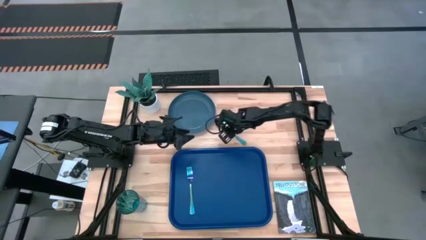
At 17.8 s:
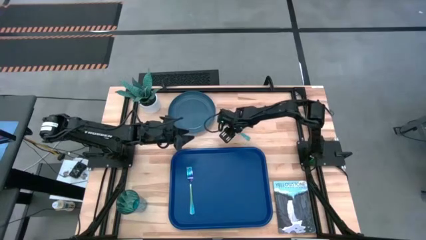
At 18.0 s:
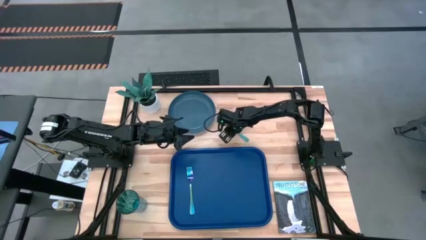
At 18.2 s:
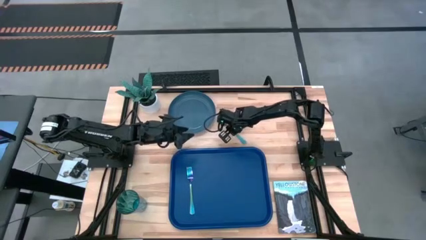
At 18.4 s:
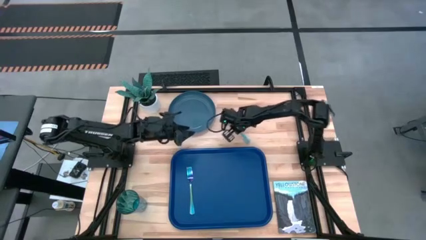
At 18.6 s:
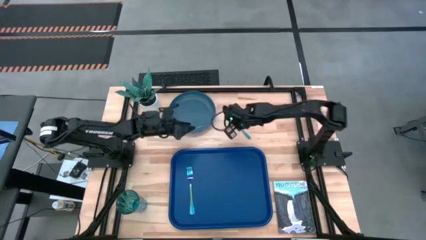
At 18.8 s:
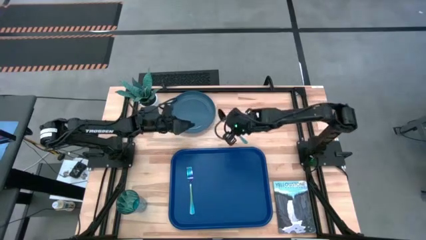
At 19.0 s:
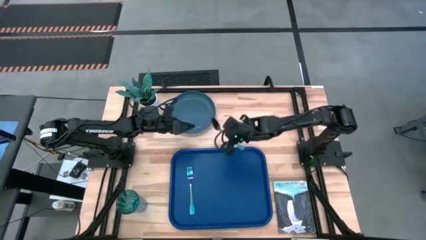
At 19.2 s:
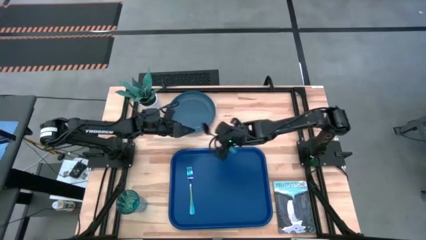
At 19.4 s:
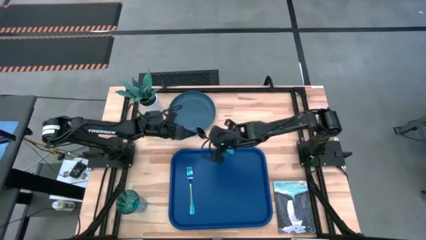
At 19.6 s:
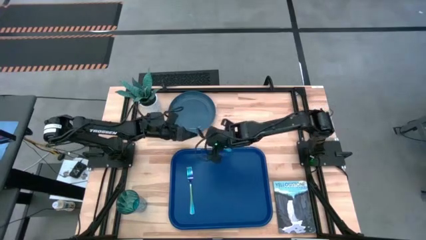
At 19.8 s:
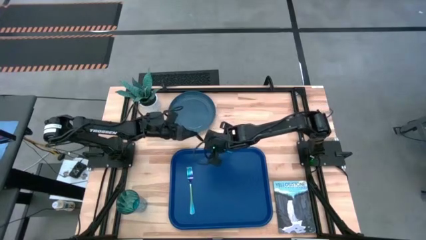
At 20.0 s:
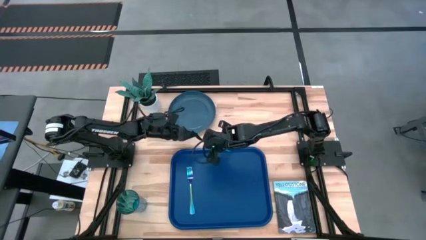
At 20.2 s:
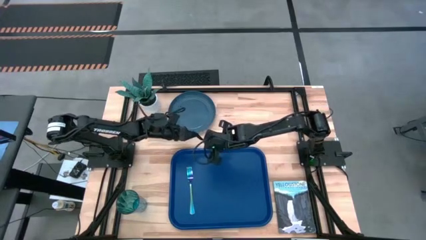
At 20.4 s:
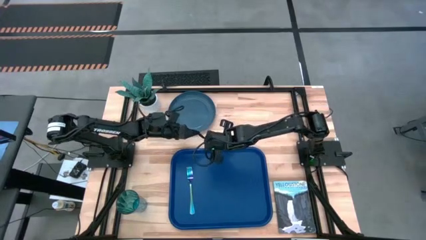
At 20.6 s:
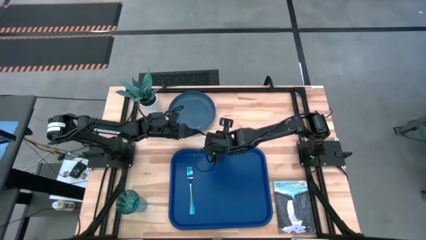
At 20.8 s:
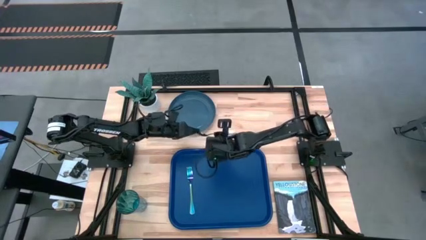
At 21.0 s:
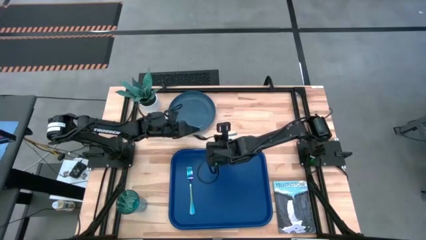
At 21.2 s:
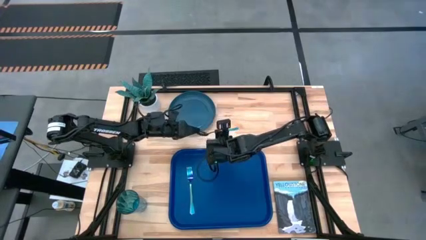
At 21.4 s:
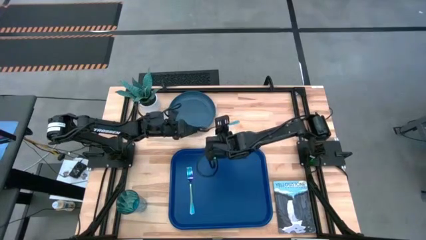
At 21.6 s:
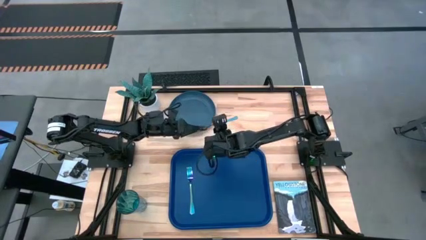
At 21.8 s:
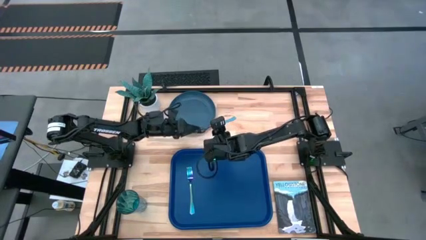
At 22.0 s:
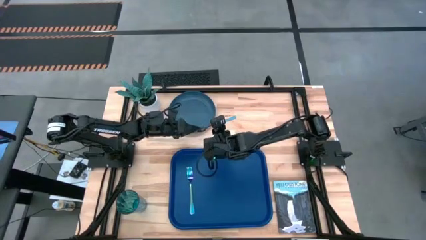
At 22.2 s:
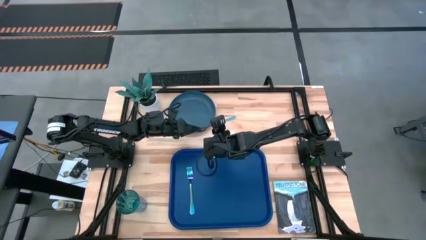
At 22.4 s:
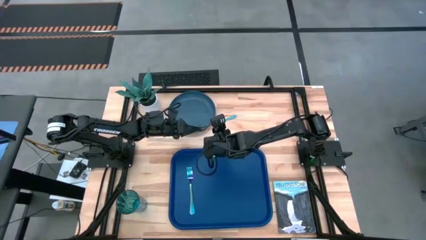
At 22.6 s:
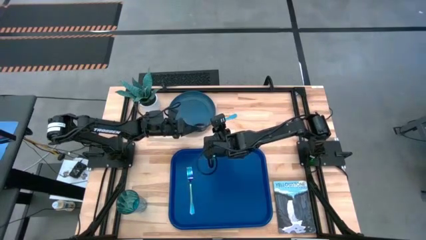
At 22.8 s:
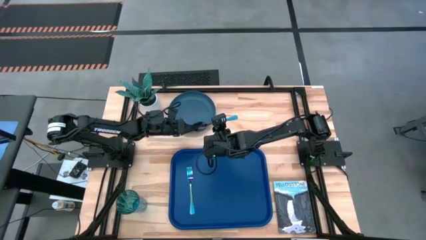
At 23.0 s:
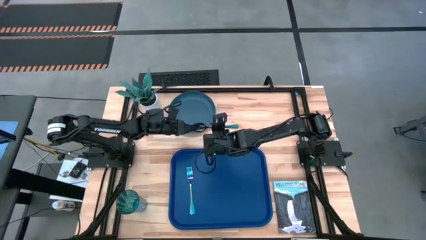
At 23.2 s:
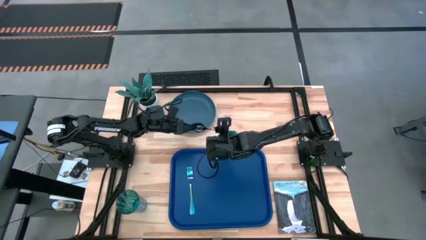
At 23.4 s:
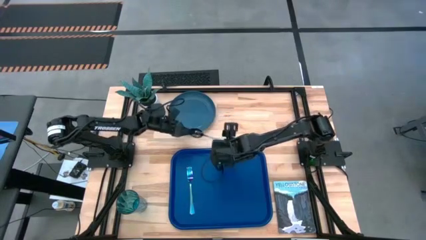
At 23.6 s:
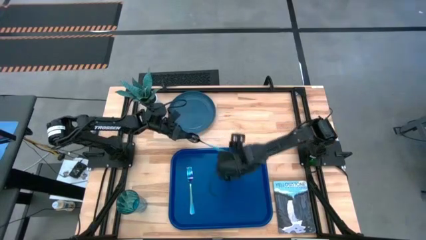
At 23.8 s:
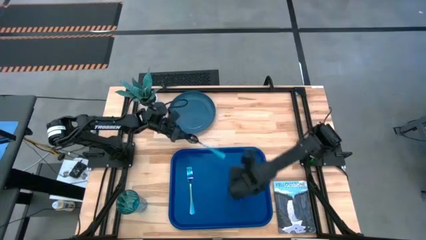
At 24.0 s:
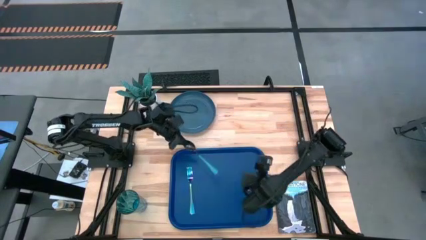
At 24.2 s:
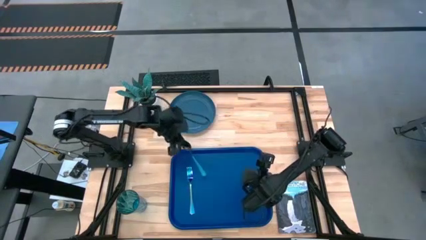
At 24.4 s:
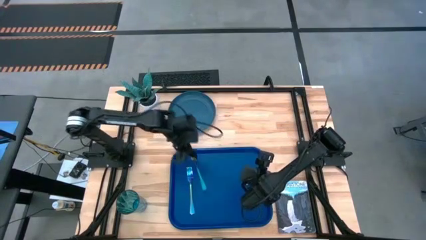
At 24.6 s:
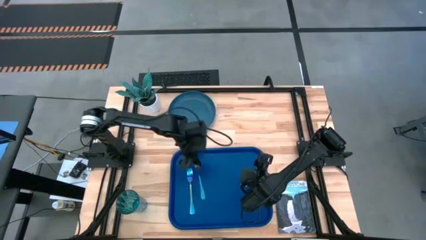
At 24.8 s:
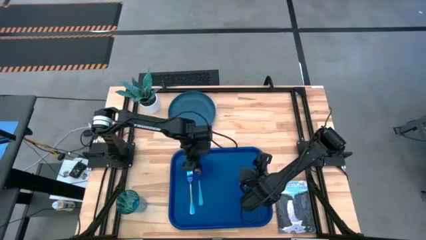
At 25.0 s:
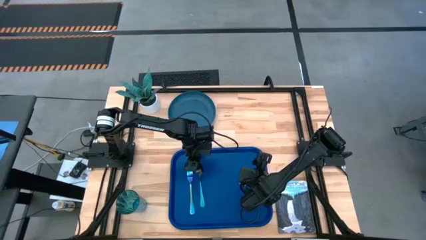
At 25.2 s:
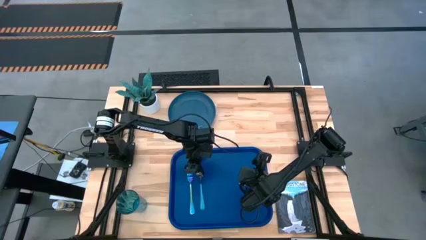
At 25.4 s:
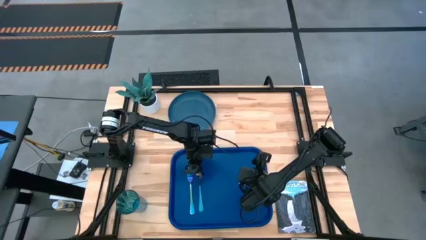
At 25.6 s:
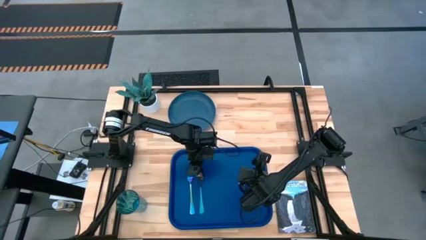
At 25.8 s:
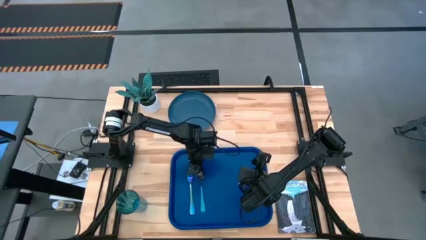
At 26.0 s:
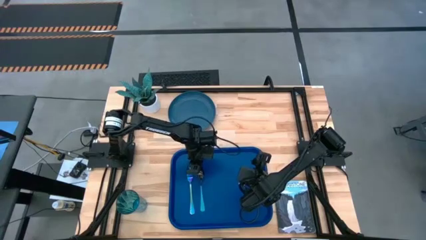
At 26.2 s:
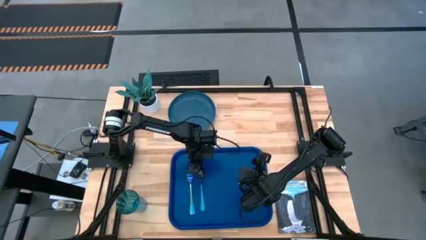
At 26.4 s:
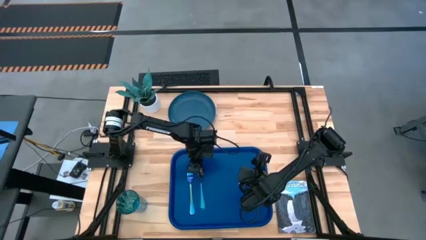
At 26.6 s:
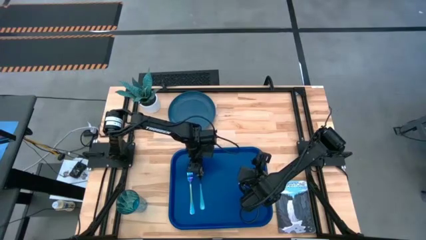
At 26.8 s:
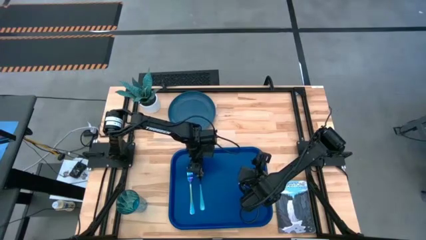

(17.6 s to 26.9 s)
Task: Pick and place plate/cup/fork/spoon on tray
Put the blue spoon on the blue tray

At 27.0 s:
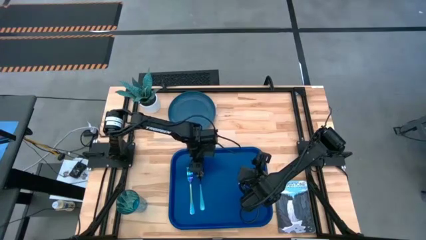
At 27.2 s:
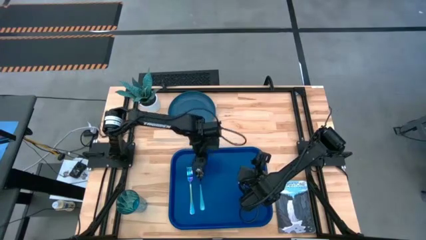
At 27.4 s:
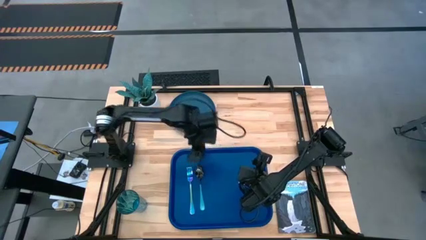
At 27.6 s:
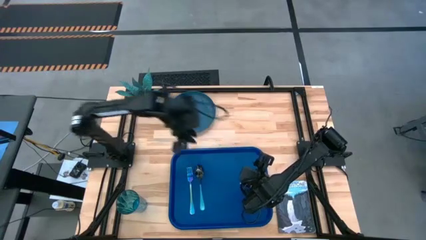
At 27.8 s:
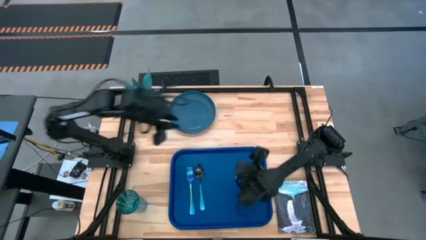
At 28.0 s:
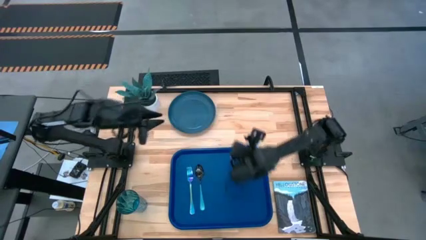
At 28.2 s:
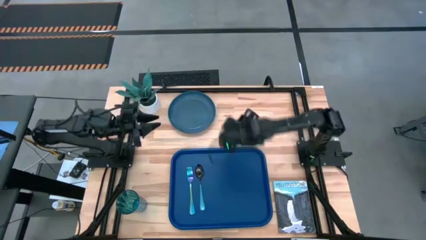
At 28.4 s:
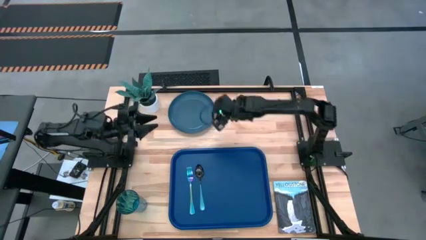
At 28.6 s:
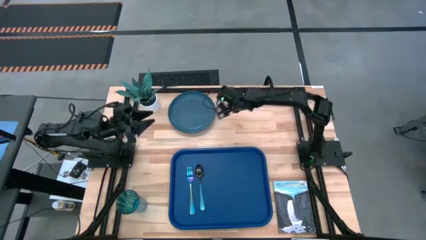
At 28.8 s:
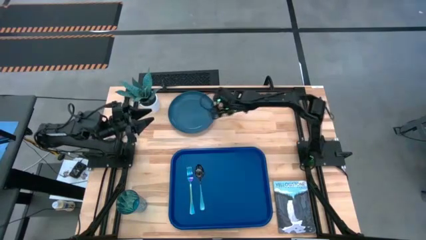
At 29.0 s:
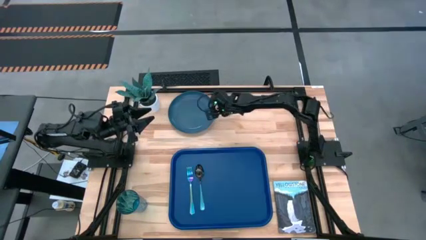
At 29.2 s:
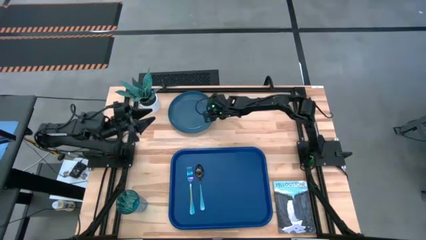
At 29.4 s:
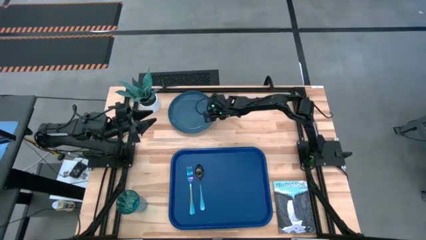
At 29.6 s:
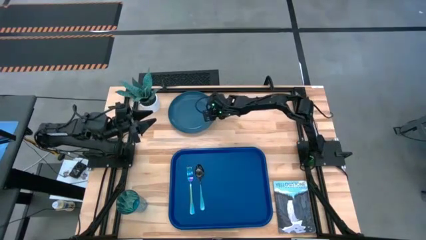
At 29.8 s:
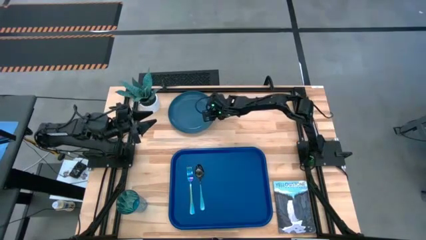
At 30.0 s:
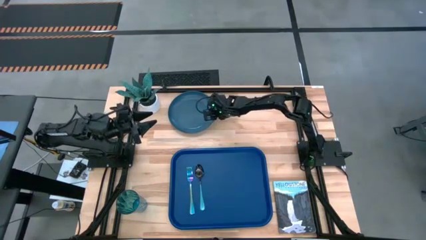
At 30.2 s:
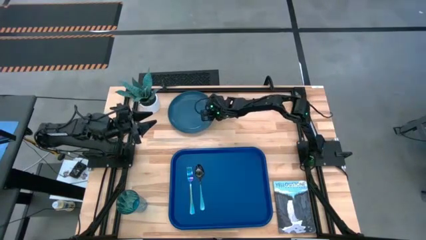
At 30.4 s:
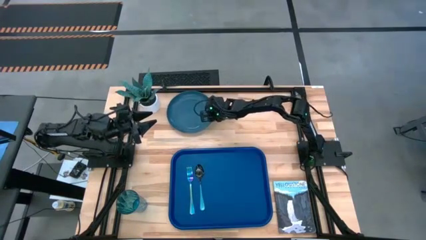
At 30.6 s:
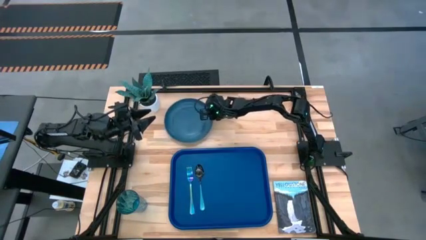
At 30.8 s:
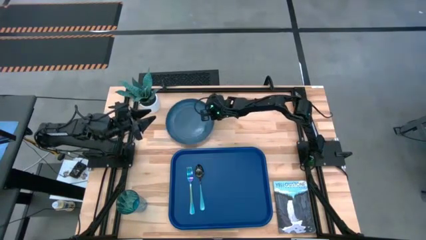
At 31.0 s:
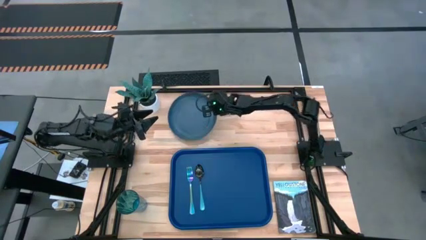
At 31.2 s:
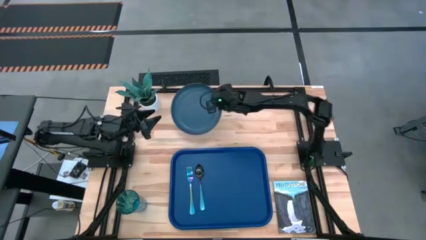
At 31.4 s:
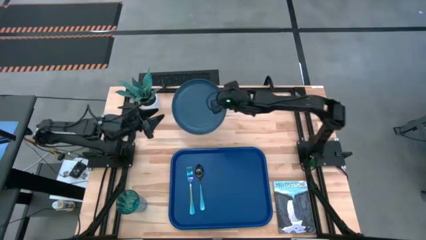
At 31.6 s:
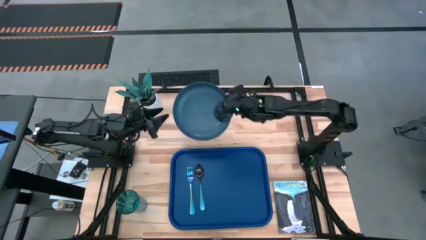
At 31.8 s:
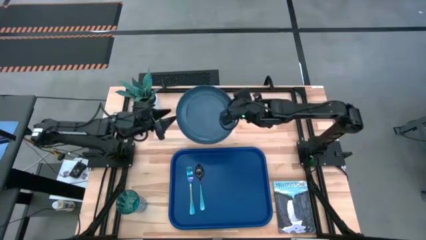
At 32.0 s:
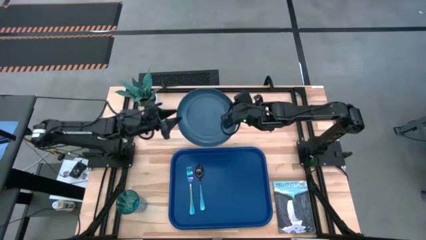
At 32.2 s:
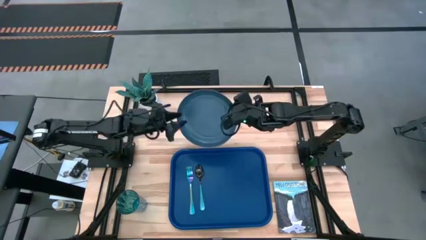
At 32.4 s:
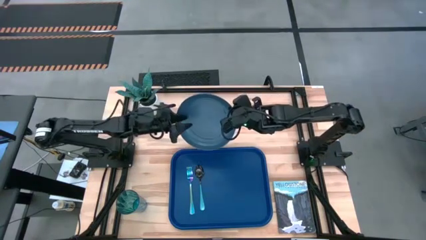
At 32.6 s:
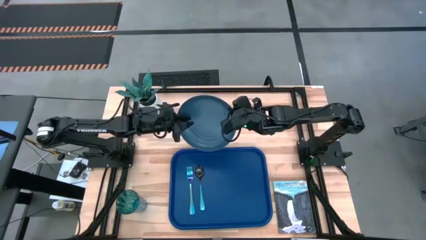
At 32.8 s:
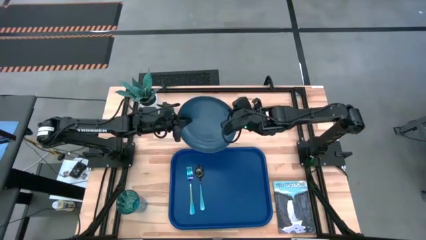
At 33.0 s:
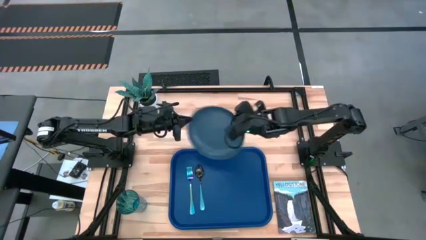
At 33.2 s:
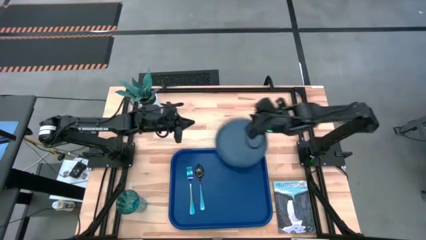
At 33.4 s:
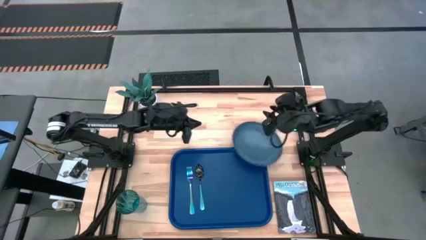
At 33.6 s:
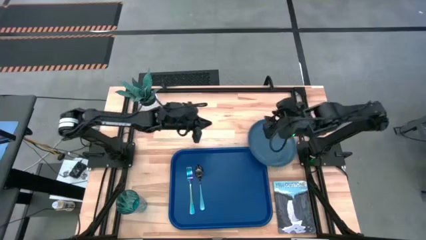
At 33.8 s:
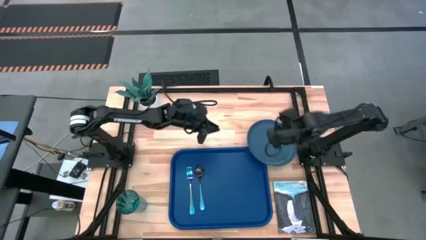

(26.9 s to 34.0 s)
Put the blue plate on the blue tray
